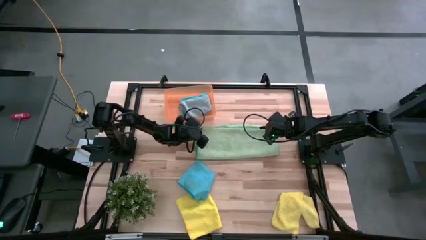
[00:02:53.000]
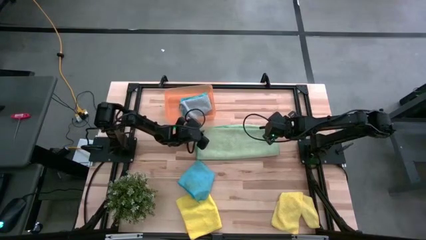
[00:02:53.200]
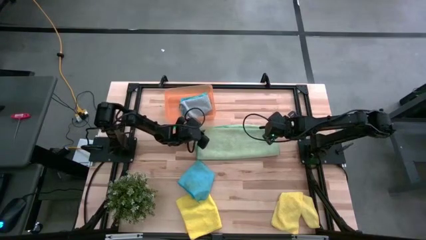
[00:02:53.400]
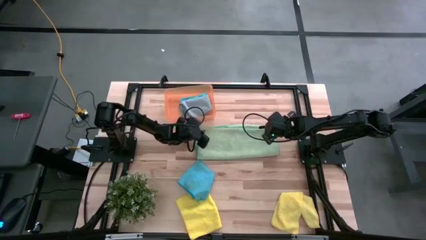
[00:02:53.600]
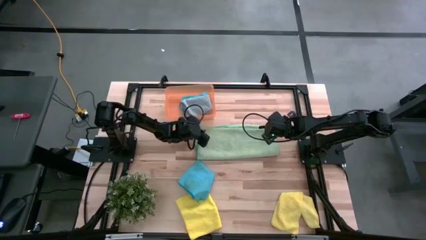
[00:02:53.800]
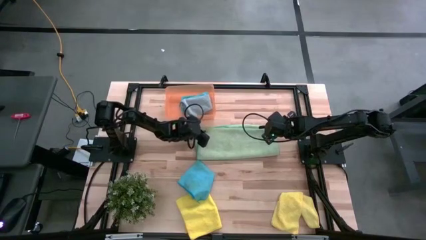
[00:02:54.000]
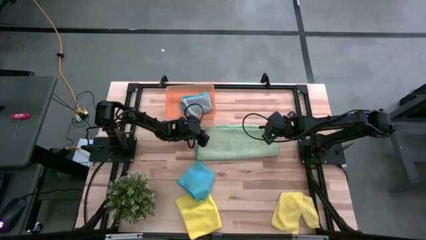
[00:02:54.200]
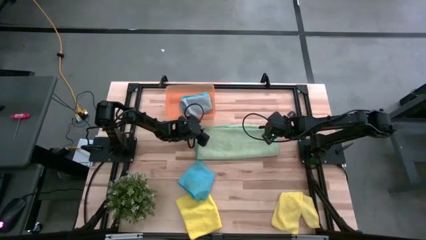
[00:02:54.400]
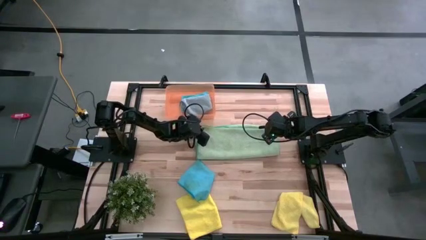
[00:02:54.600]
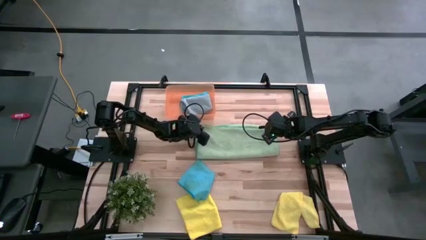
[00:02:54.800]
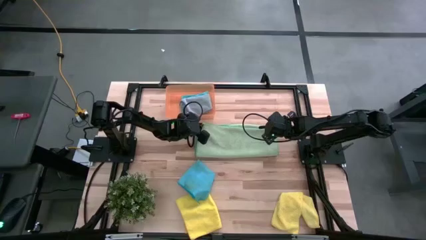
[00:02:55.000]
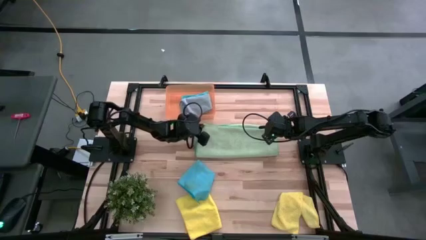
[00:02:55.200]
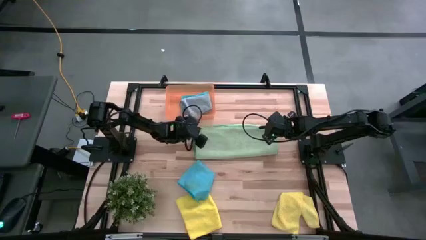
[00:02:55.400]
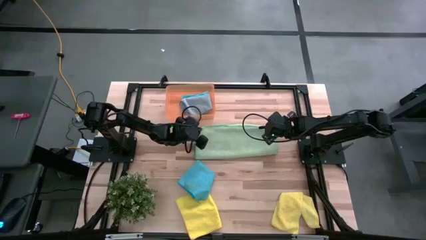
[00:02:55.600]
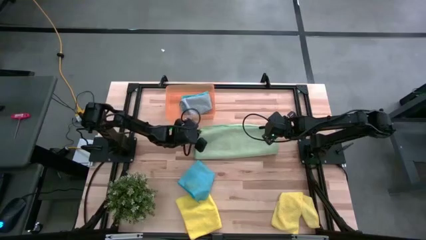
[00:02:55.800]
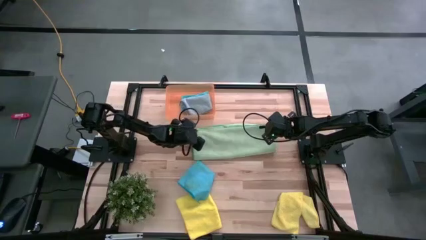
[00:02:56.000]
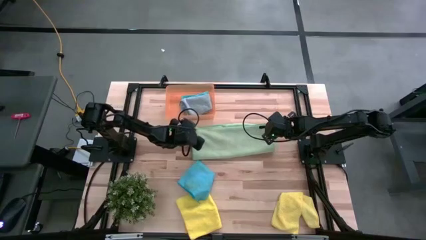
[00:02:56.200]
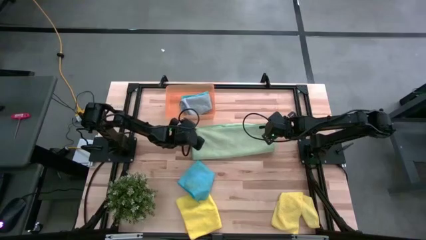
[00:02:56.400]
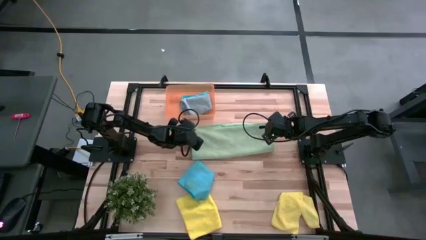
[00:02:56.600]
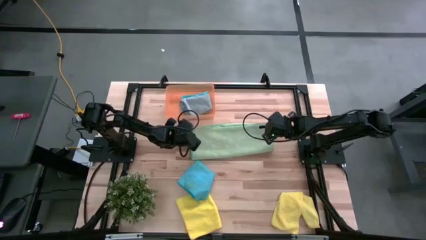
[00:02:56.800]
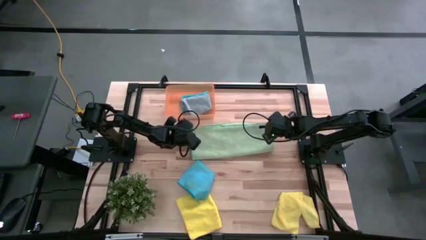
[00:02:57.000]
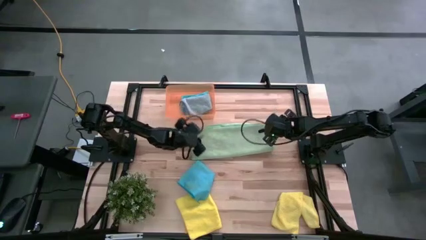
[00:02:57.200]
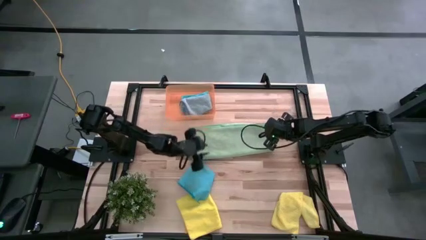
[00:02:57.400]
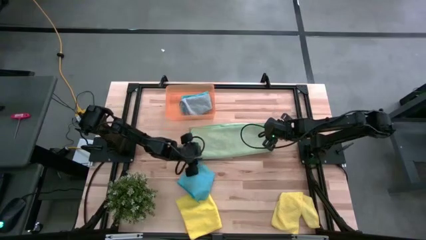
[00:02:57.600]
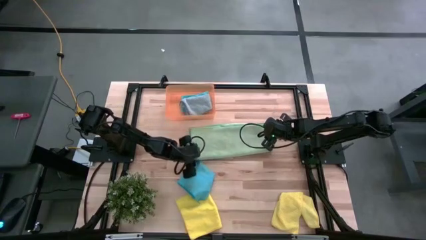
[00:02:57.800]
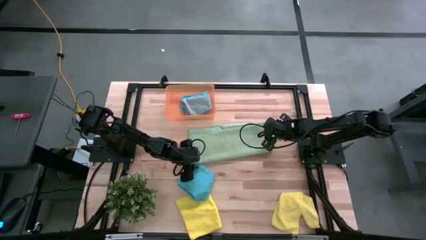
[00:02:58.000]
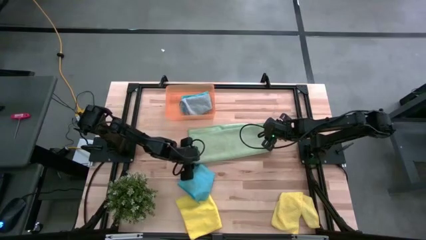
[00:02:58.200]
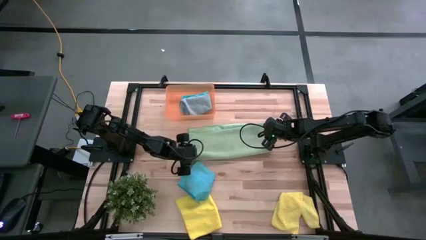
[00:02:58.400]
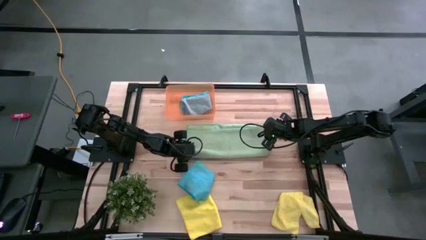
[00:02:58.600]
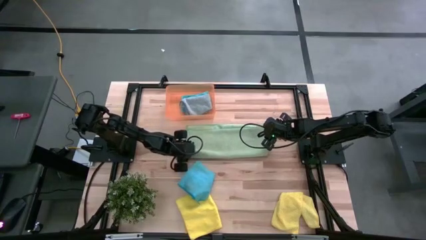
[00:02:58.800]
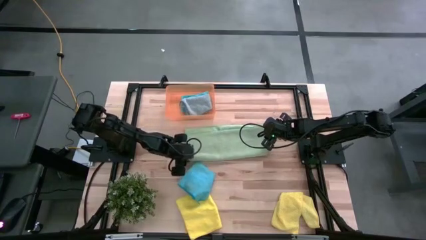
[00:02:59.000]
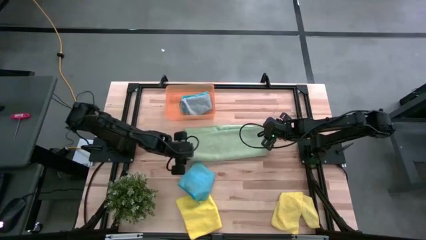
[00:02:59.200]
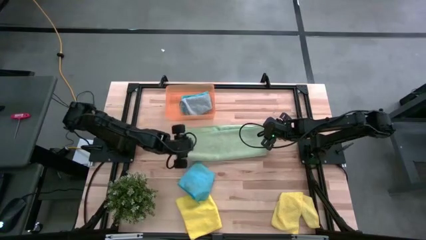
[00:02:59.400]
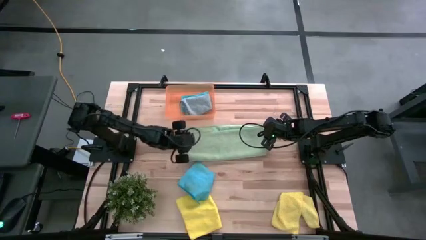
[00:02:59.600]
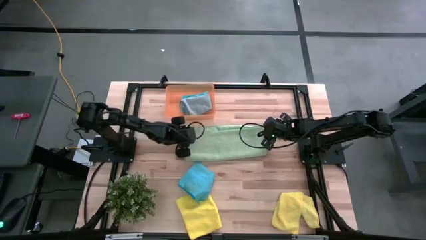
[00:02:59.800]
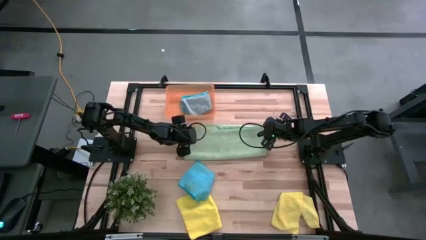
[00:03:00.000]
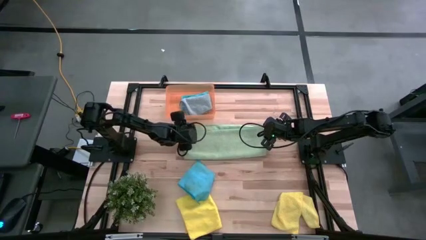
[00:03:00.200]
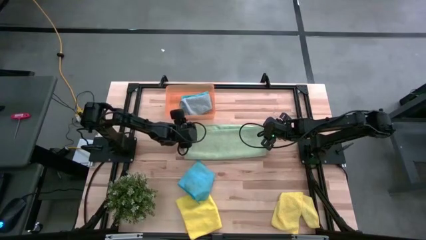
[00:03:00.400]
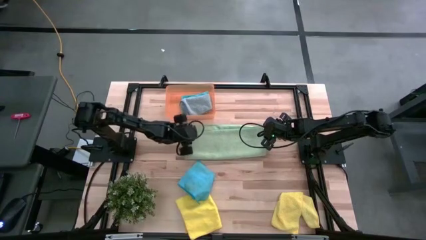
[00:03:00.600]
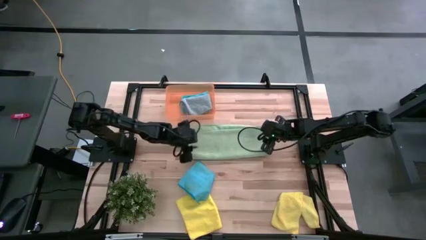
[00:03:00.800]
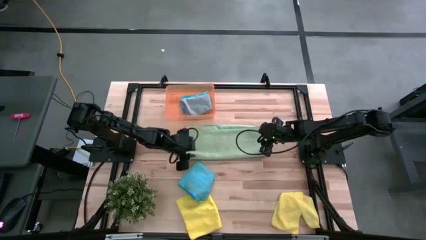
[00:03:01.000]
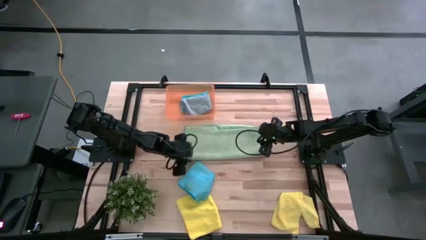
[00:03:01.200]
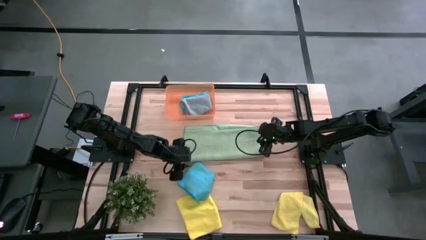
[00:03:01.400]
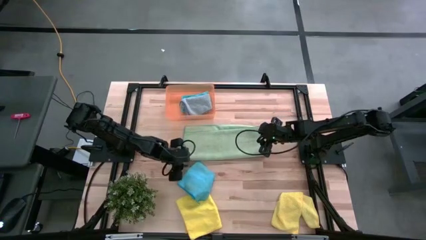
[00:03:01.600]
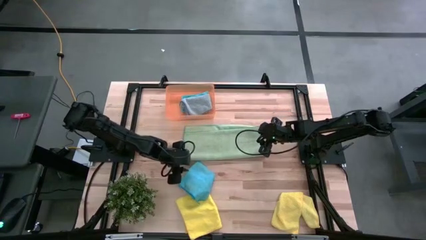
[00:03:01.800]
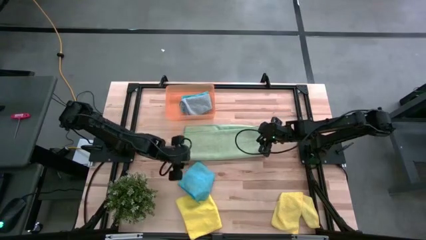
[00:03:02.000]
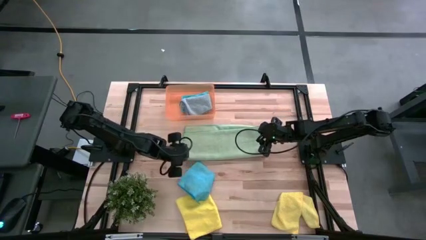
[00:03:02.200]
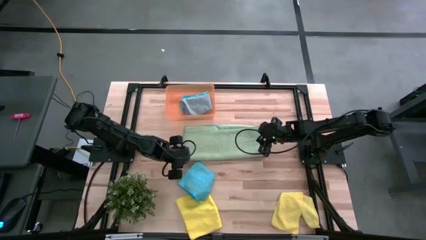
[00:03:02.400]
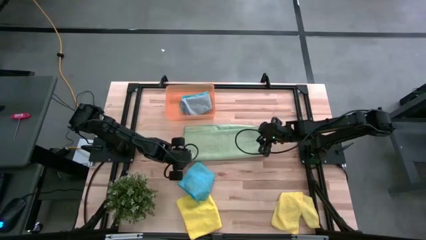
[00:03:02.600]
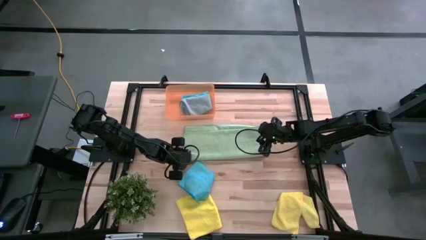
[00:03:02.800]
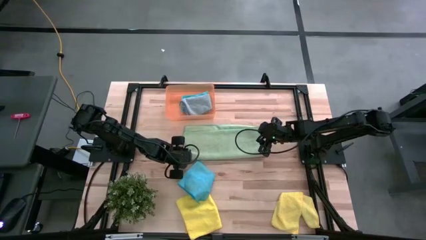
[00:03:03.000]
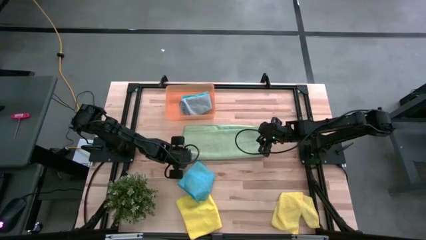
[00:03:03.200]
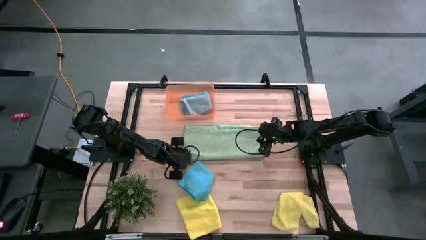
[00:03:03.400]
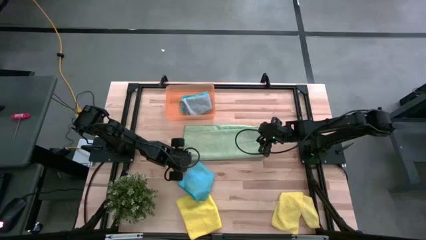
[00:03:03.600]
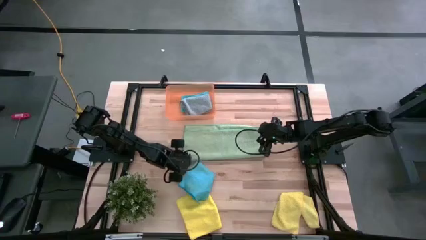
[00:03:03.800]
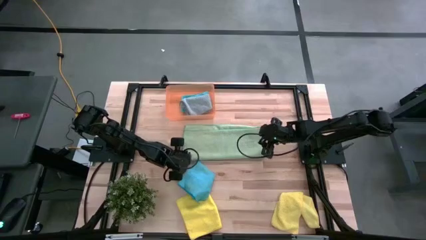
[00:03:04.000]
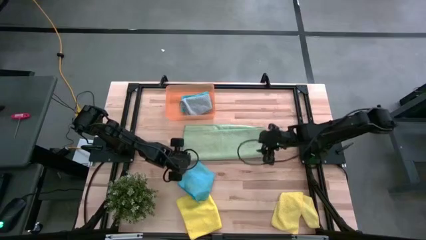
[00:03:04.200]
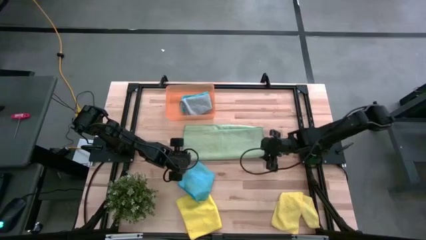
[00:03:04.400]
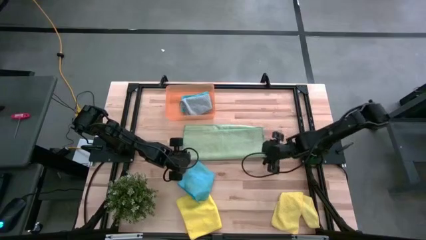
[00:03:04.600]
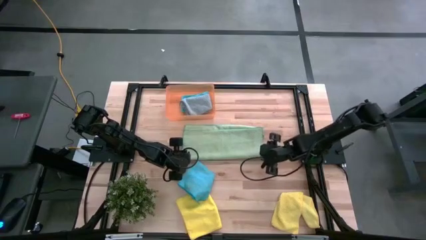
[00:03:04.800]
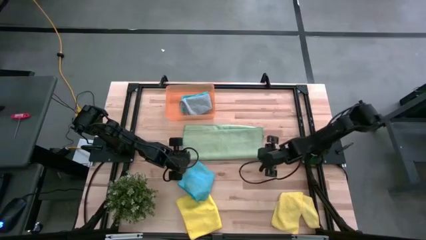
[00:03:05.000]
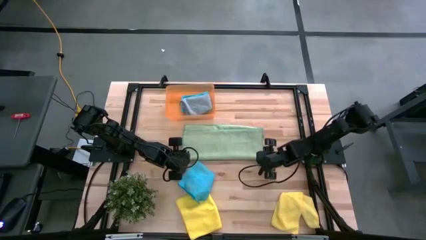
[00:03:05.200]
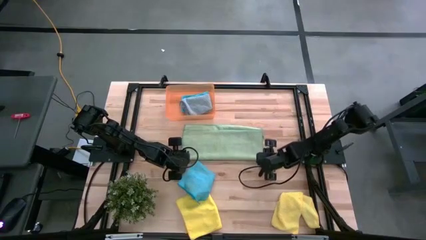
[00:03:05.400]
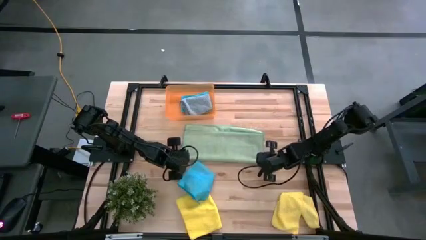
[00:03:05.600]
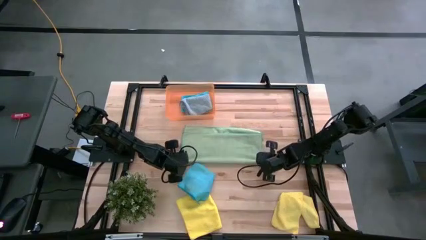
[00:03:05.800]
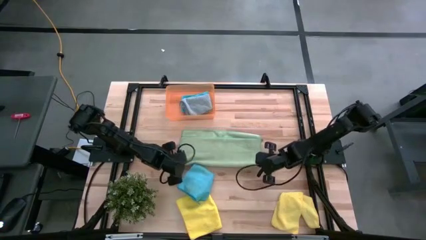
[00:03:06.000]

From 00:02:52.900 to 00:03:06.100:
Task: Fold microfiber towels
Fold the green microfiber cloth

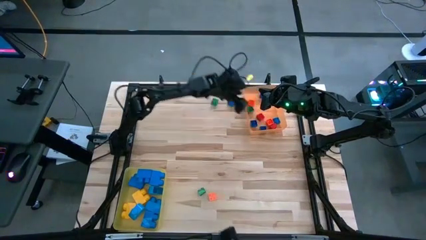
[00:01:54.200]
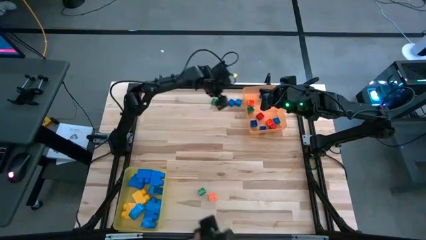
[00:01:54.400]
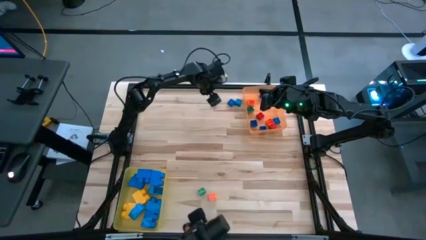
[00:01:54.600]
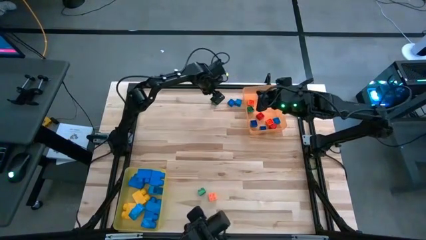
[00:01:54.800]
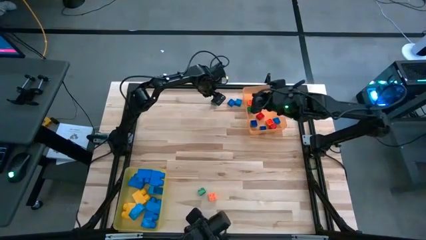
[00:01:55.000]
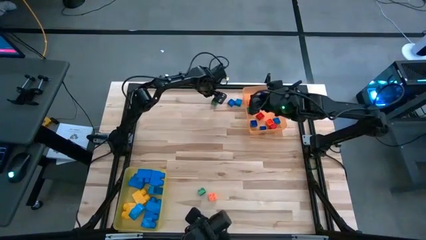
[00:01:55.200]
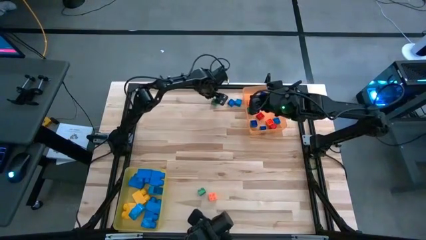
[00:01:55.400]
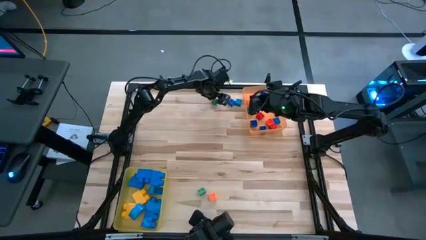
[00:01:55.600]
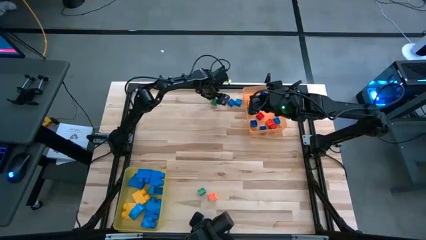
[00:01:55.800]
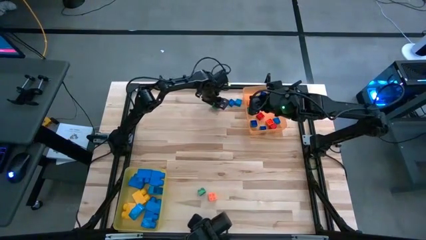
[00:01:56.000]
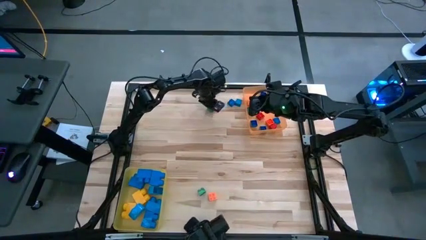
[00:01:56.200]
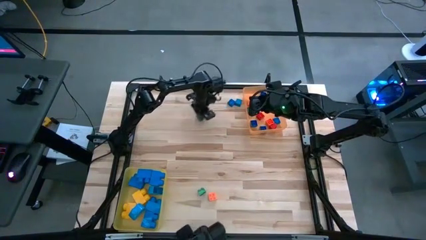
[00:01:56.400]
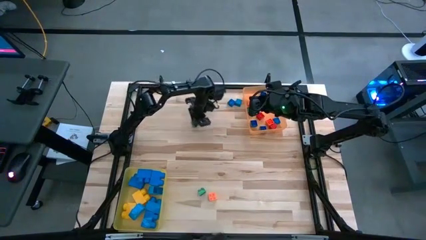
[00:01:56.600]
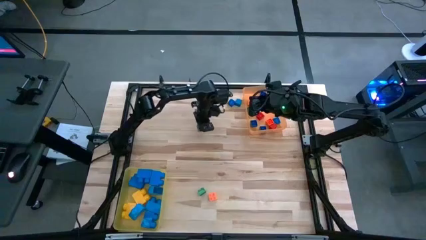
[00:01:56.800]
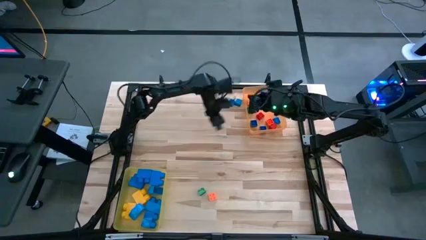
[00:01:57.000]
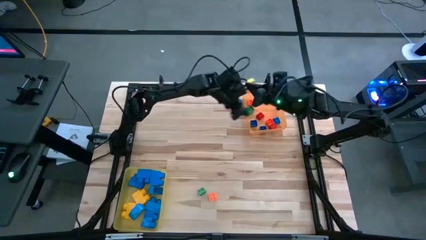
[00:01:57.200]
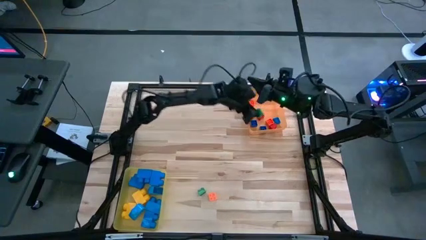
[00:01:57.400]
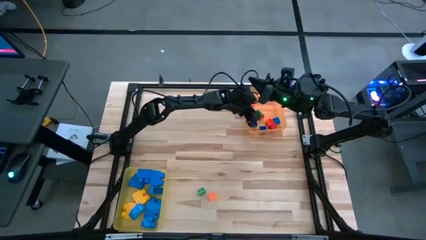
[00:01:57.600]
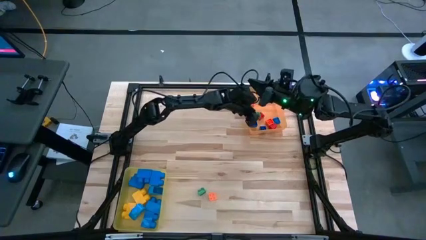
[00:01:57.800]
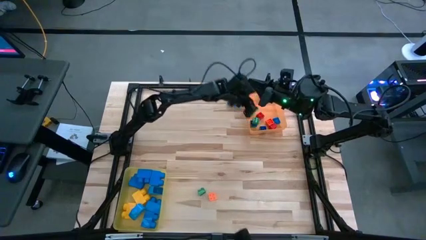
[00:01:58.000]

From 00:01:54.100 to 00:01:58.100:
Task: Sort blocks by size
Put the small green game piece into the orange bin
